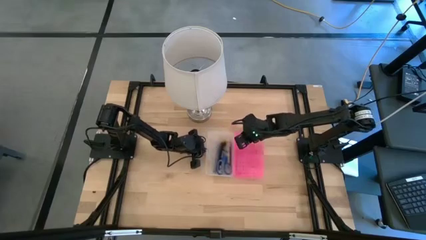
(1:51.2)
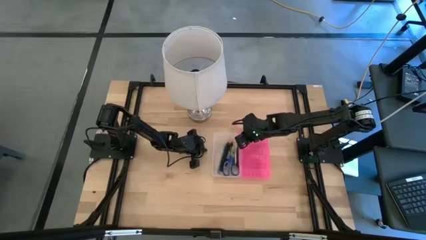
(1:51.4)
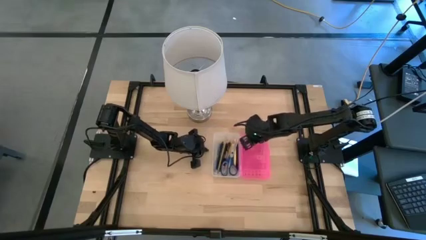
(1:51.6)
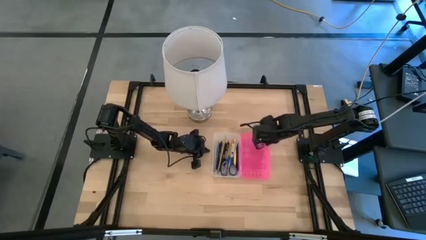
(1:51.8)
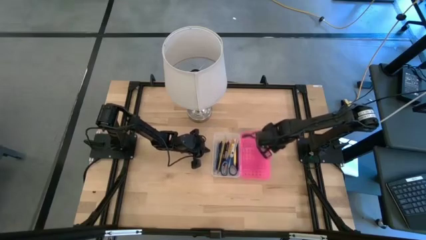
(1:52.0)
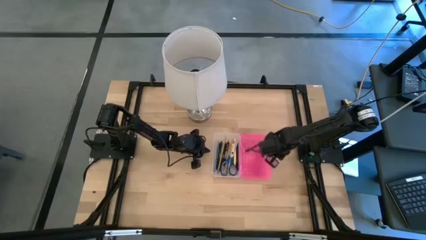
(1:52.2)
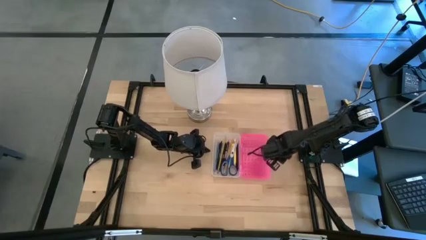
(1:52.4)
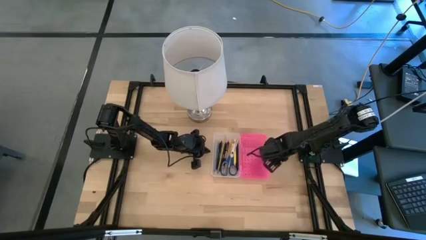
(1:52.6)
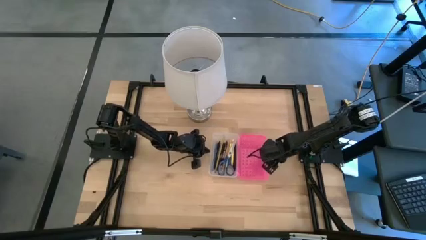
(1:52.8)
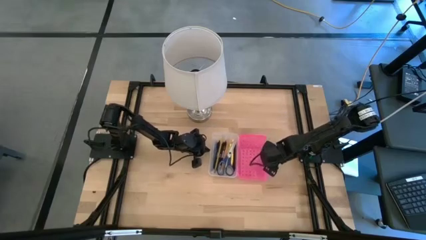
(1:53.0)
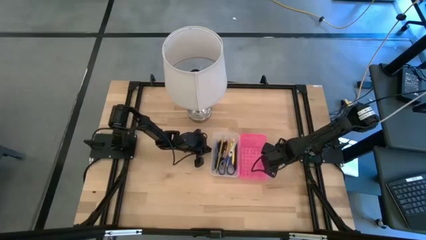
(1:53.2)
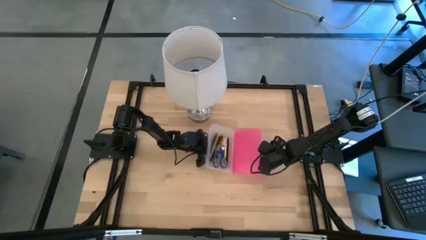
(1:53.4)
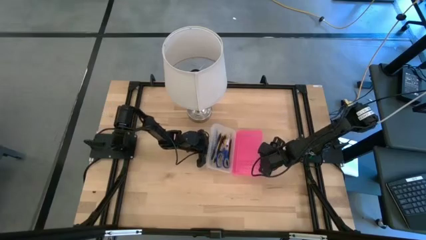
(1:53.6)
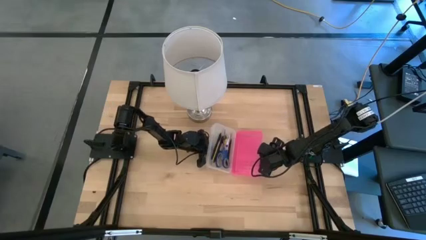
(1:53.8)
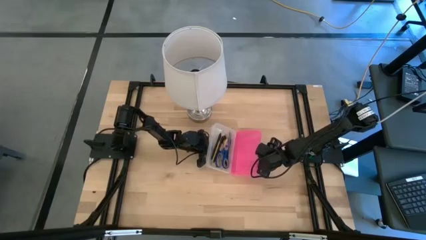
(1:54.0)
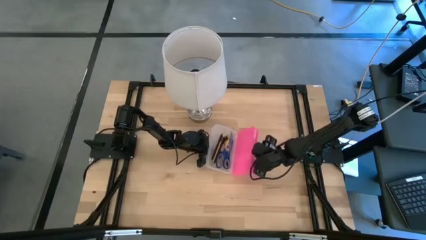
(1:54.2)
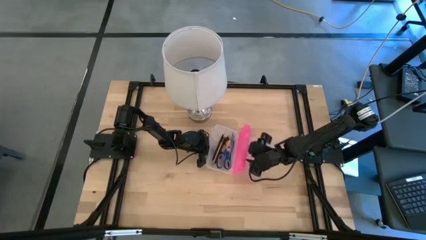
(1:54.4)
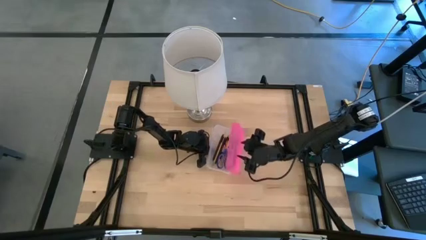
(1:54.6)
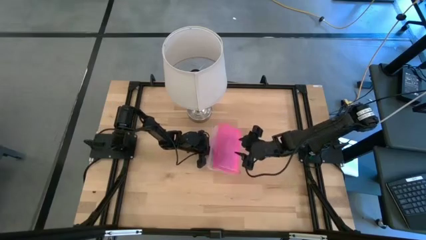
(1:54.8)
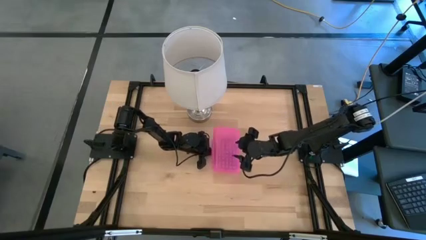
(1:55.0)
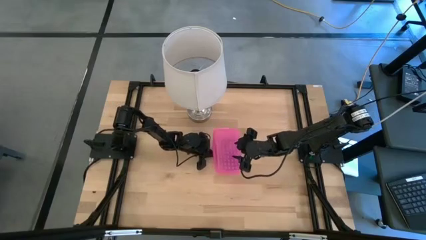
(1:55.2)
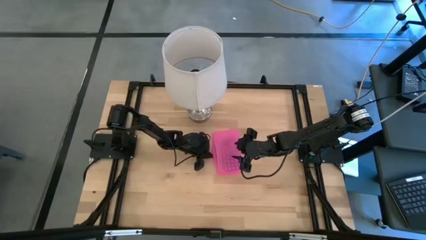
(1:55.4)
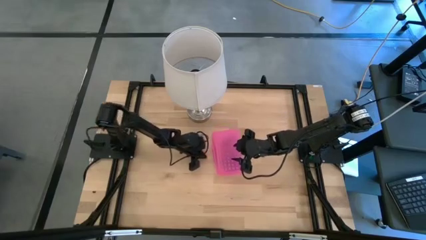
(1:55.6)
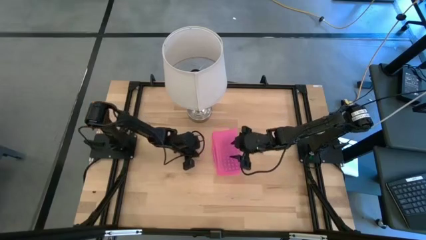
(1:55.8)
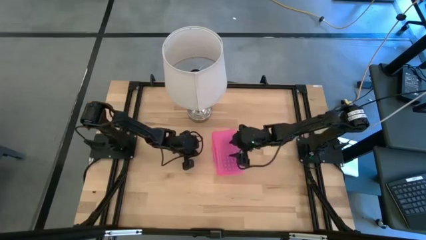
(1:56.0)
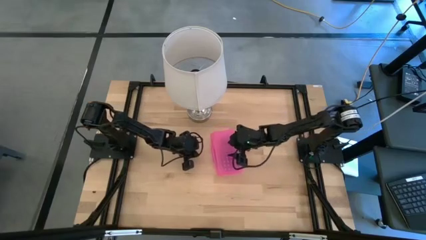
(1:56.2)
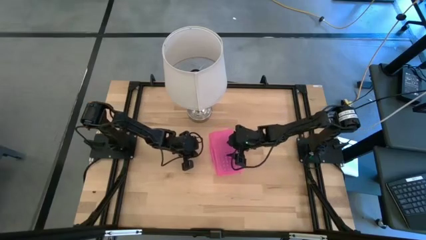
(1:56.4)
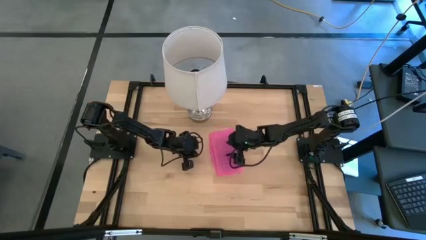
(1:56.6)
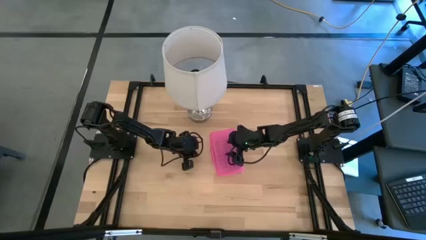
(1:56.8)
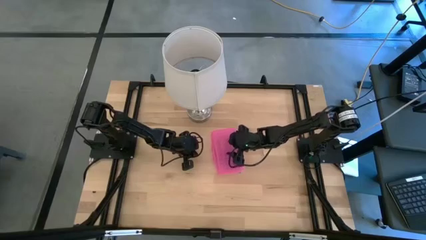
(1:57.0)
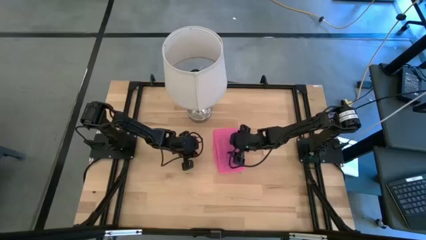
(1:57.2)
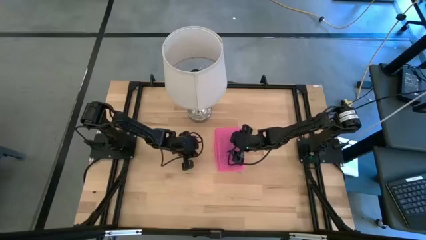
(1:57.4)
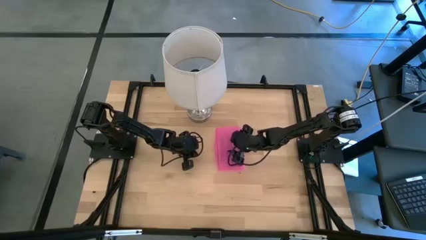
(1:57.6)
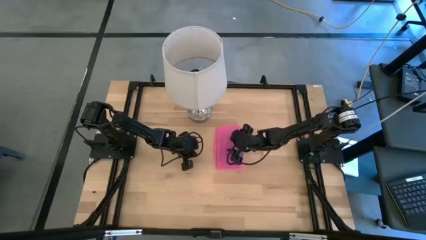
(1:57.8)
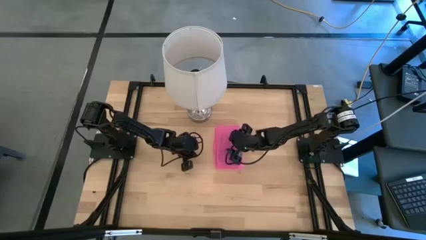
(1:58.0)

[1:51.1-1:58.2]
Task: Pick & place school supplies into a supply box
Close the supply box

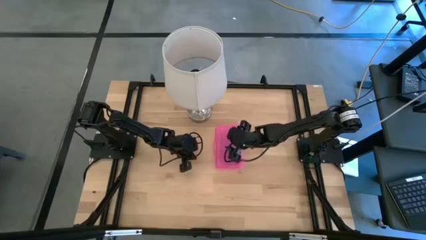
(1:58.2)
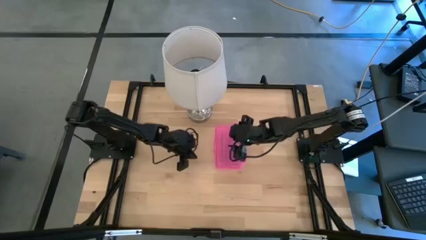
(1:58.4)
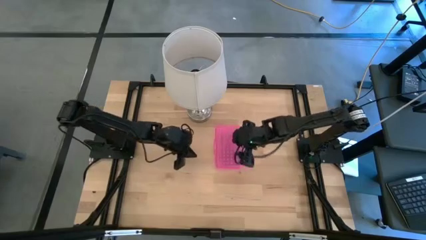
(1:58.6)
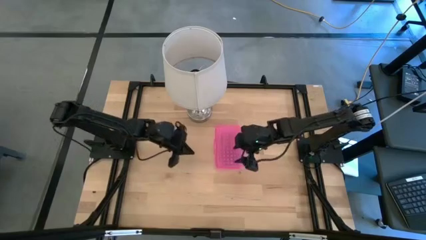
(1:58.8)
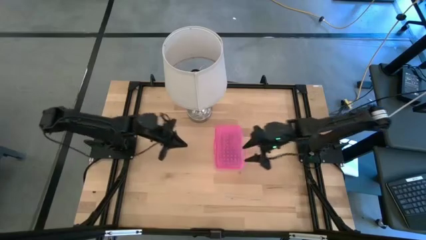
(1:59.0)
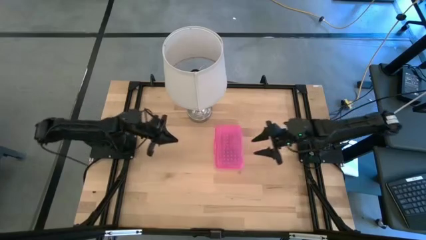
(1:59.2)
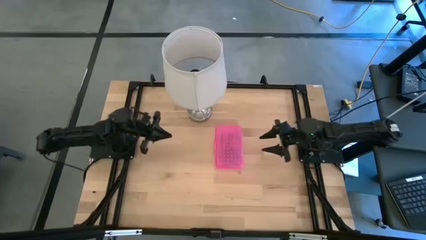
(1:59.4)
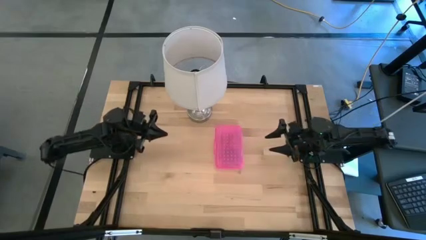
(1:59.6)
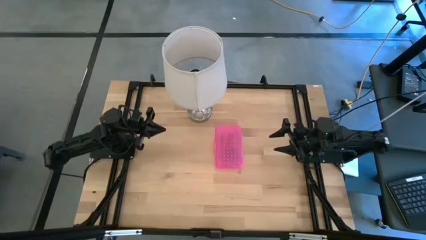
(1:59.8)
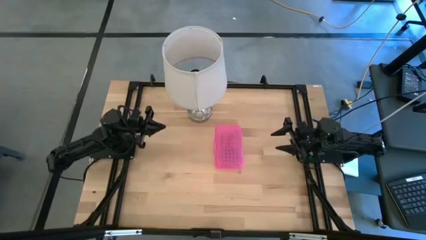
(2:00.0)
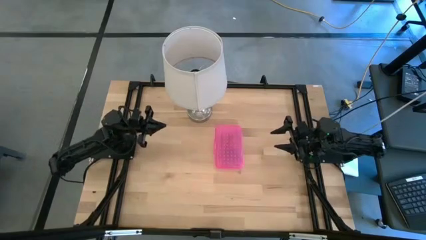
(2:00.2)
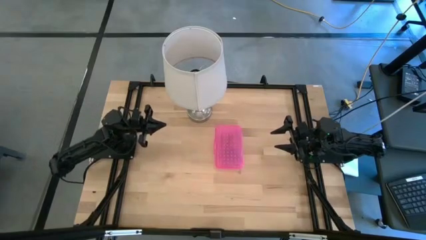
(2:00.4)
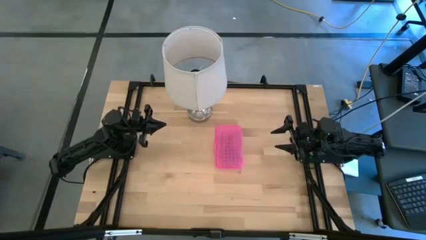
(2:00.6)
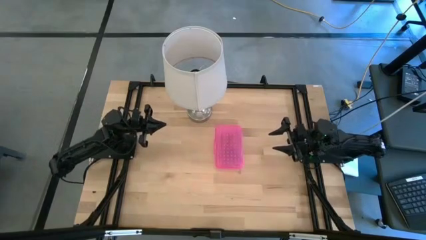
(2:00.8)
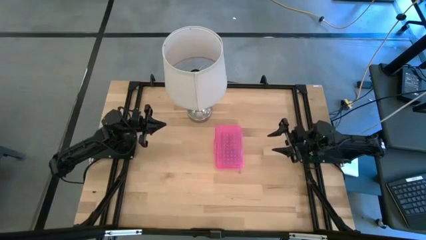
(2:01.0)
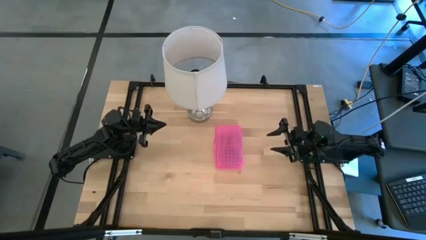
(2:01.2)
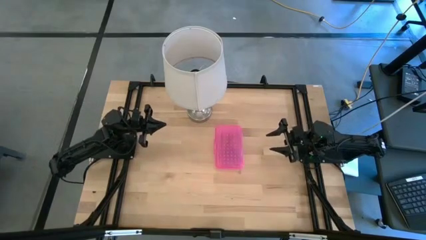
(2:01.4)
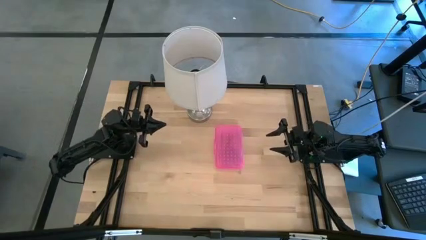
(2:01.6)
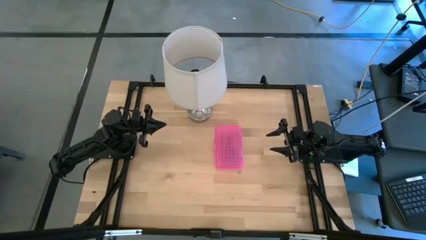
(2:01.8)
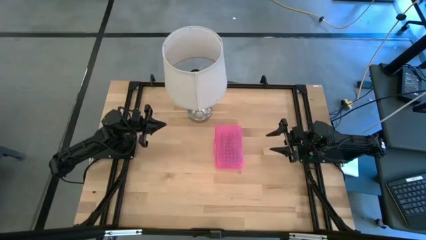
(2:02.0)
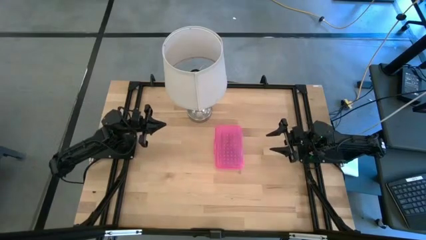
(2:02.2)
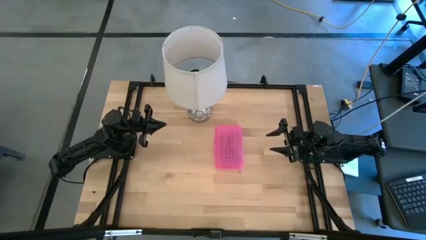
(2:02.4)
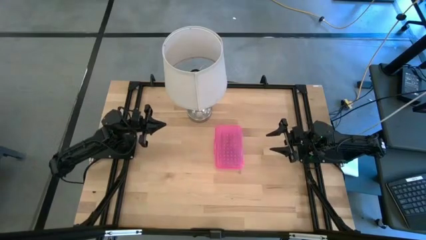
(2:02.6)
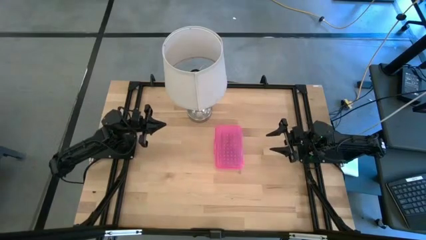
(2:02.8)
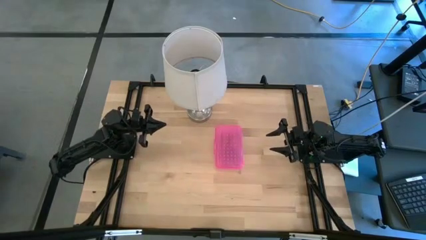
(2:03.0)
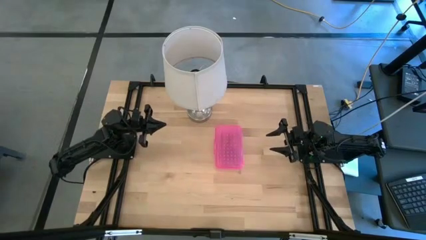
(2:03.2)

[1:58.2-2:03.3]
Return to Home Position

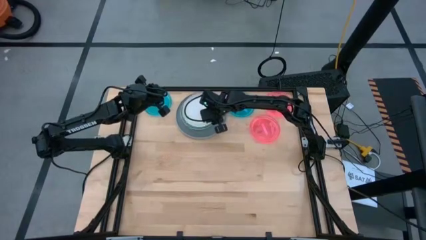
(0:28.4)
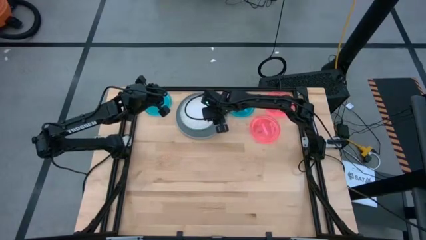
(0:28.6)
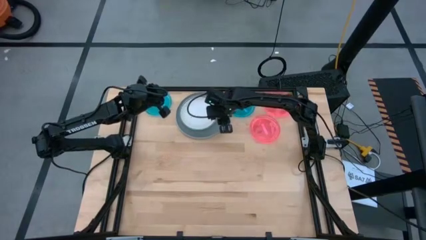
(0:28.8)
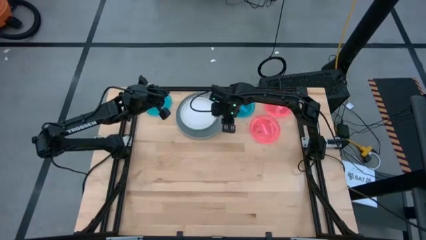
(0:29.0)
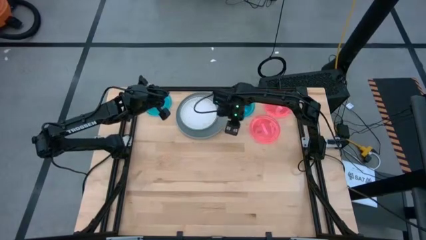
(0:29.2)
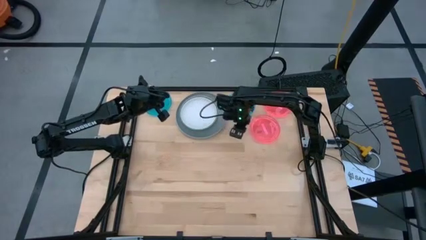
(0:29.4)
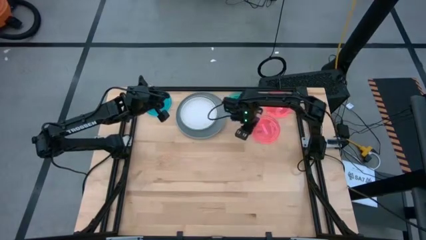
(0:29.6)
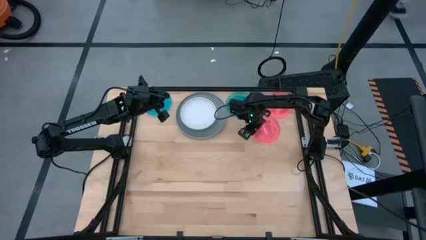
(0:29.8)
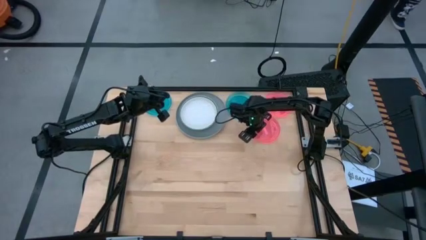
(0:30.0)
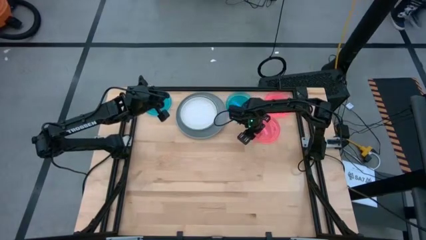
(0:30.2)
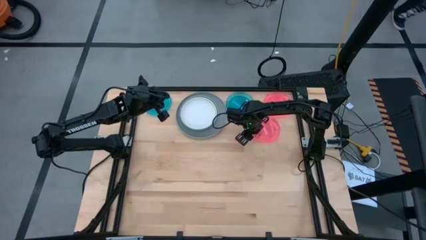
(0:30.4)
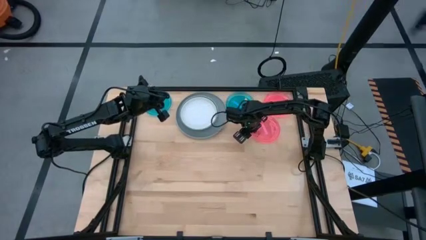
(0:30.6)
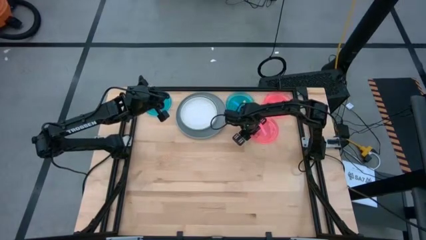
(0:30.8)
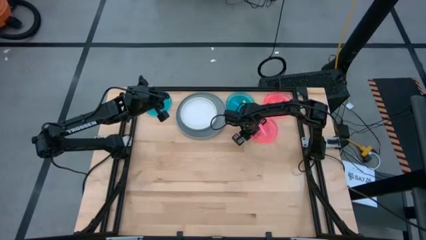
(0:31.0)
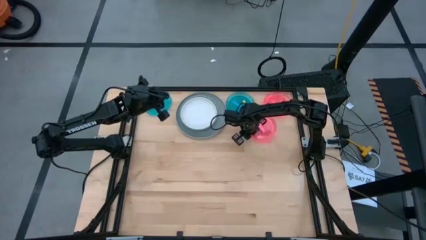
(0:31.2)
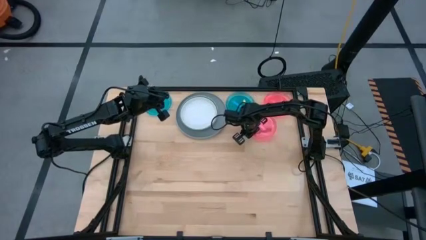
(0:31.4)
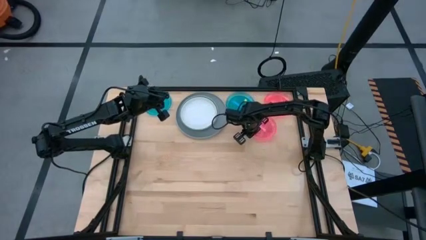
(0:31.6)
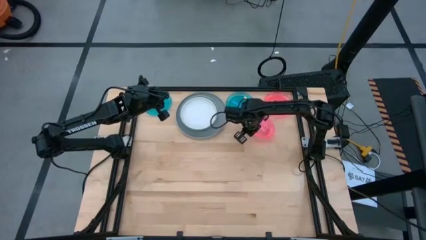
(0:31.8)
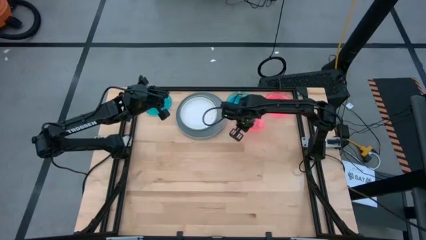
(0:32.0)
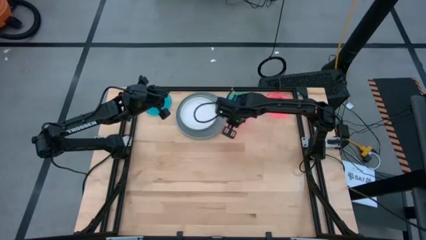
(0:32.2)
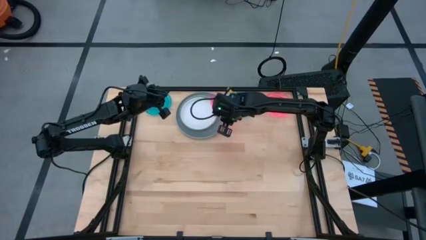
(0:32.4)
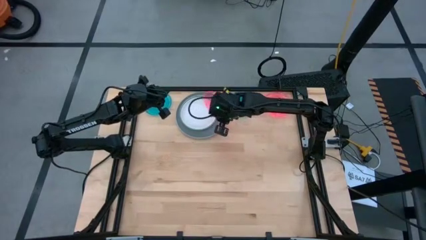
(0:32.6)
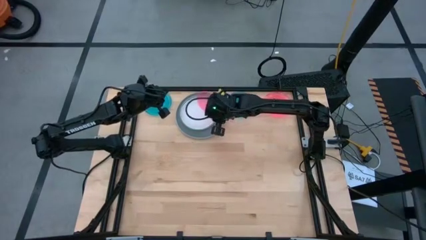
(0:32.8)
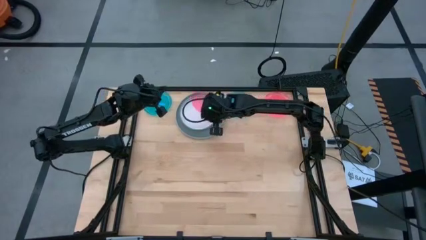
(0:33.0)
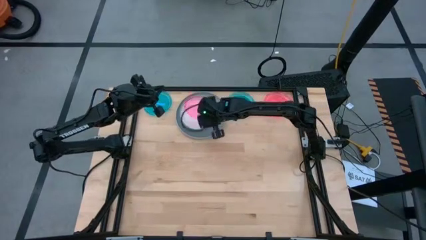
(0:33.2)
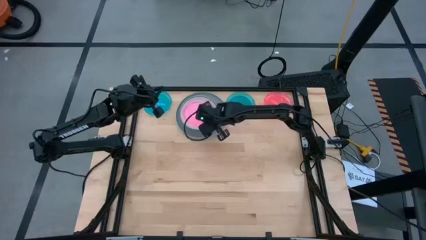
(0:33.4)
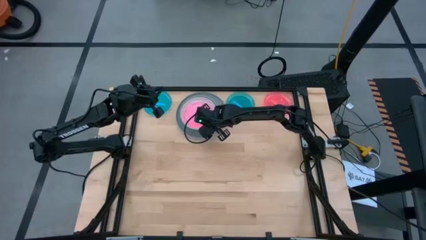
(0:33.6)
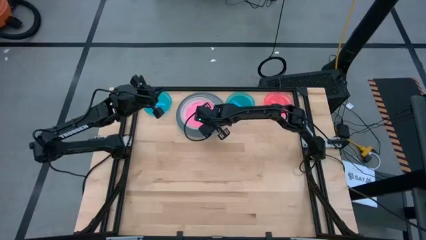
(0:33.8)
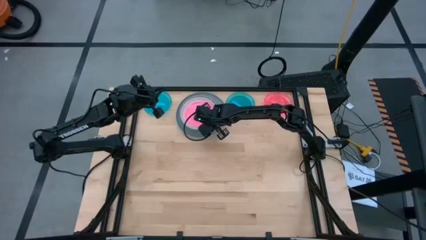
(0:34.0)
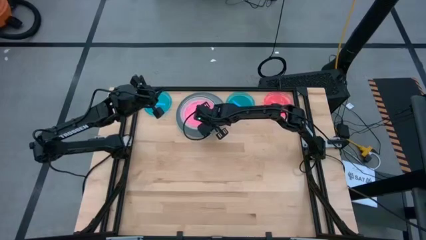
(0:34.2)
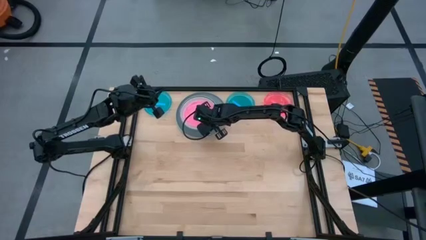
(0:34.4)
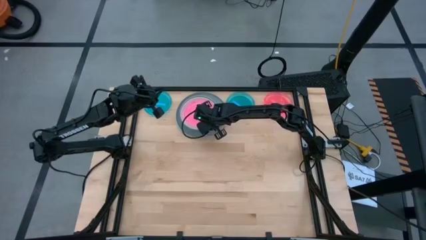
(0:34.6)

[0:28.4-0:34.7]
Task: Stack plastic plates
Stack the bottom pink plate on top of the white plate
